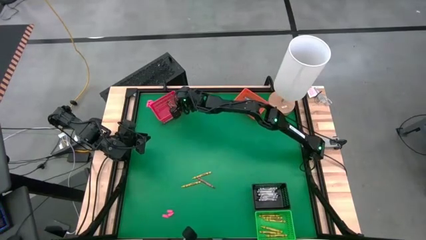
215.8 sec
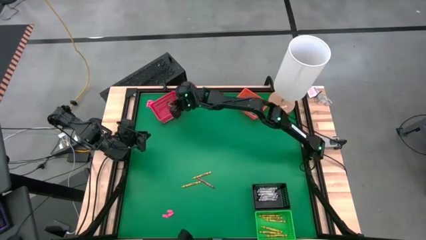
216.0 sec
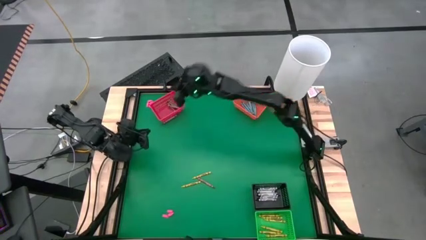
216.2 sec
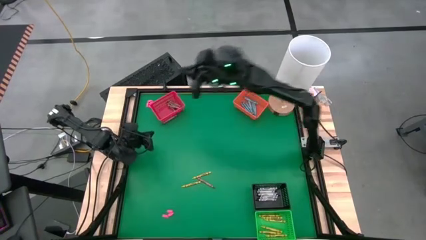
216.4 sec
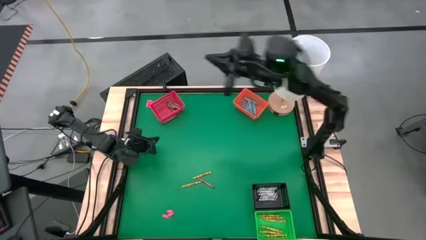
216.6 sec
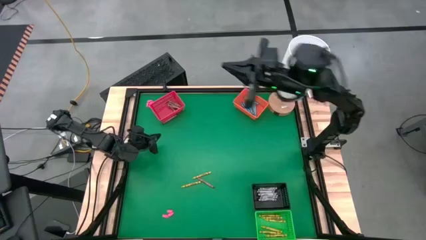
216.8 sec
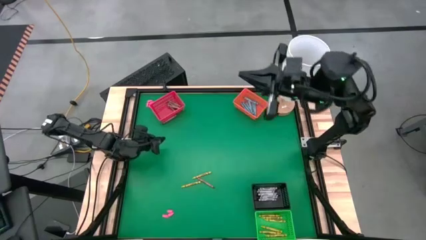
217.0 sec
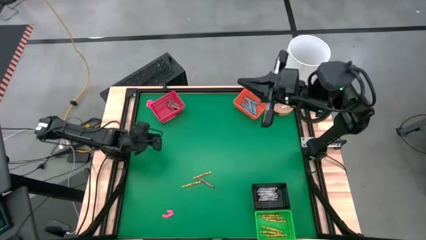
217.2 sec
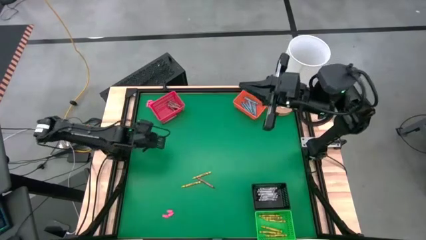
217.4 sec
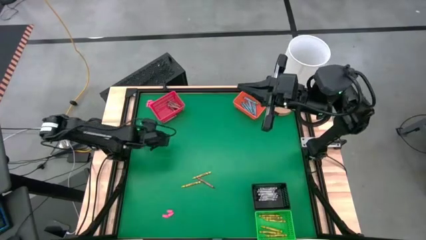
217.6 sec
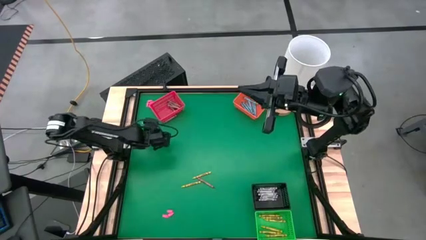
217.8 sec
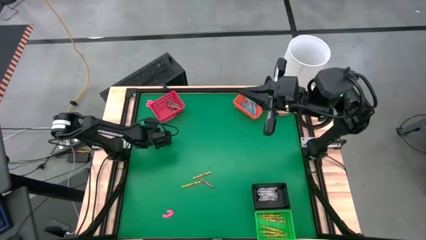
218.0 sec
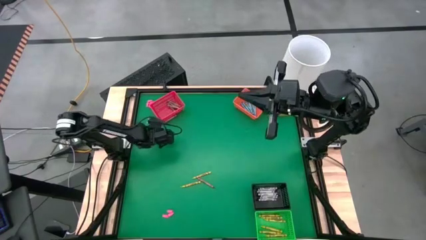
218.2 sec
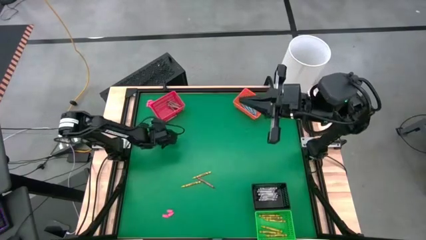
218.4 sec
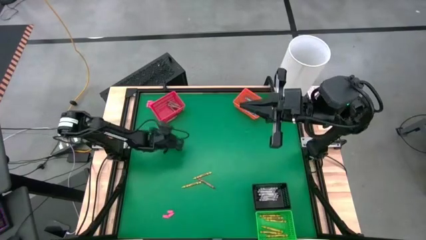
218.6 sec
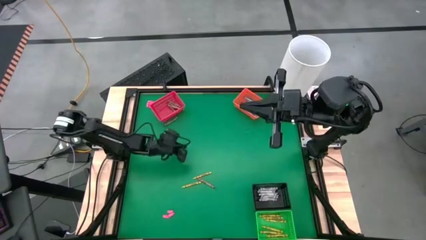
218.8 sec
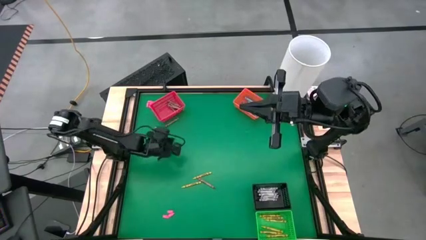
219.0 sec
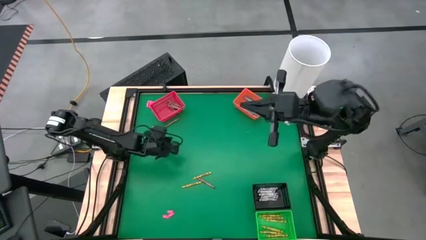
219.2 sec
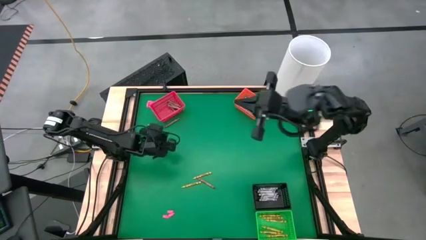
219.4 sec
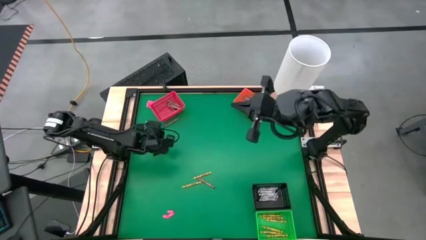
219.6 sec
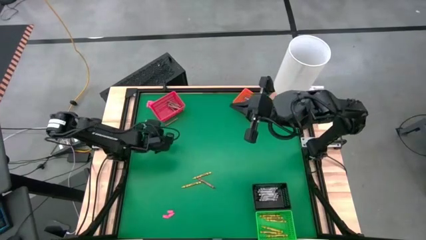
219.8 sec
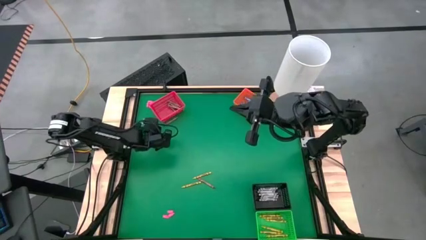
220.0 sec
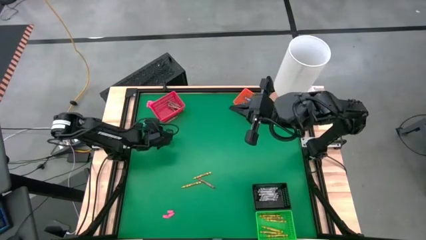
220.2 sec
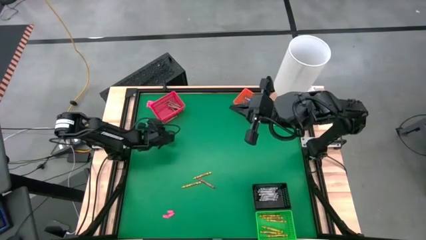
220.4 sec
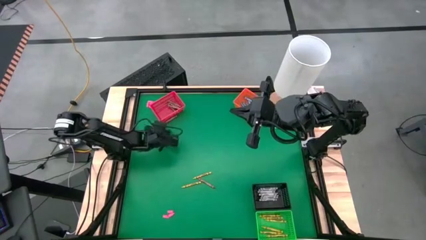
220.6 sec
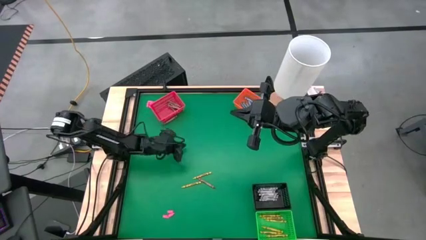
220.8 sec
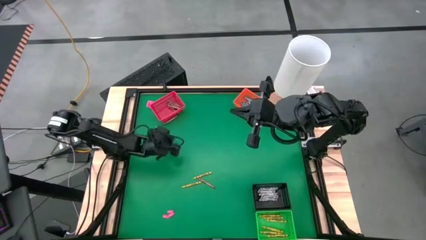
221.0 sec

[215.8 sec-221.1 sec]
Task: Sort crayons
Put the brown crayon into the red bin

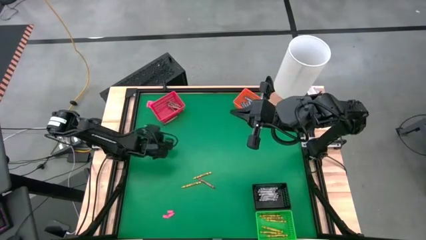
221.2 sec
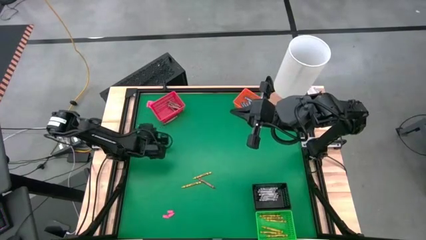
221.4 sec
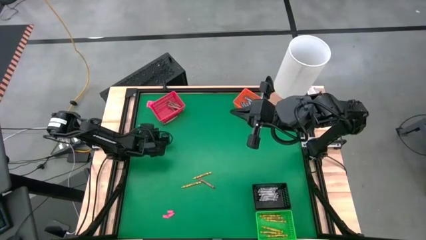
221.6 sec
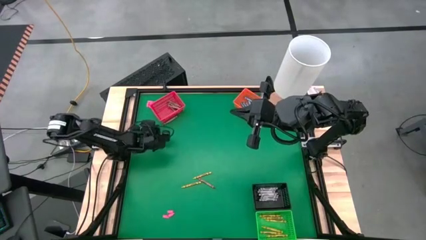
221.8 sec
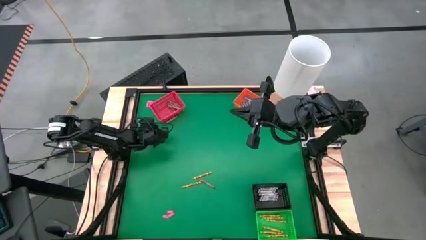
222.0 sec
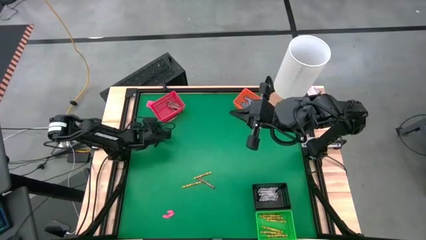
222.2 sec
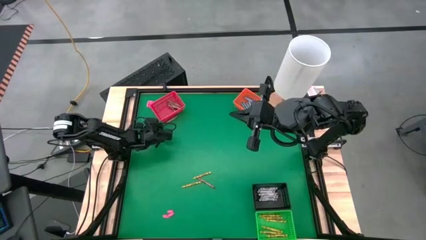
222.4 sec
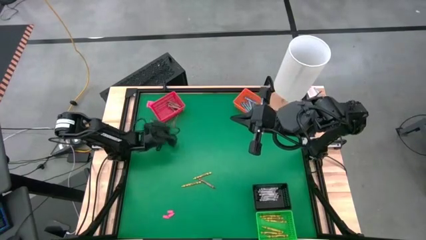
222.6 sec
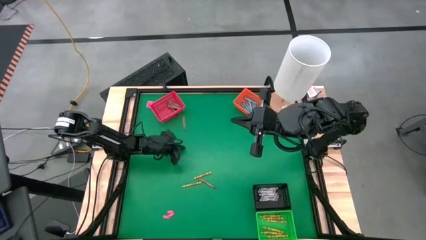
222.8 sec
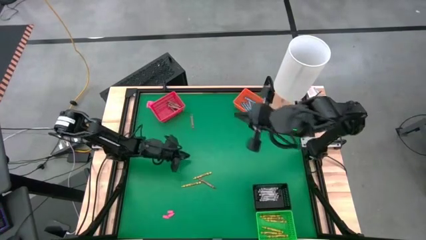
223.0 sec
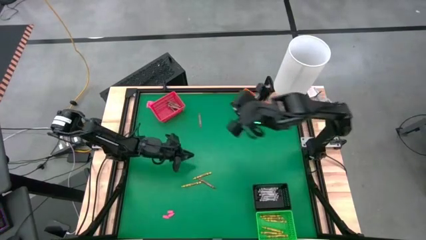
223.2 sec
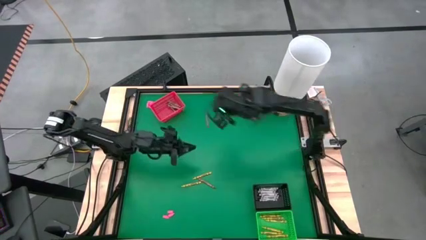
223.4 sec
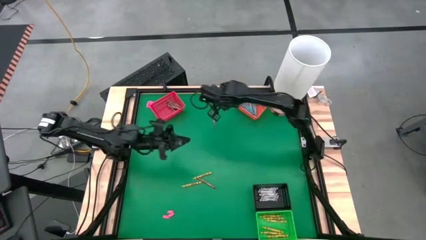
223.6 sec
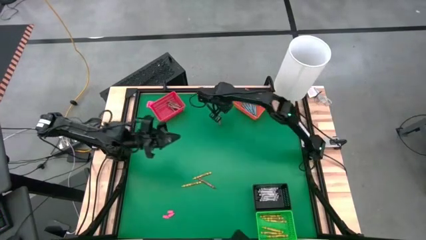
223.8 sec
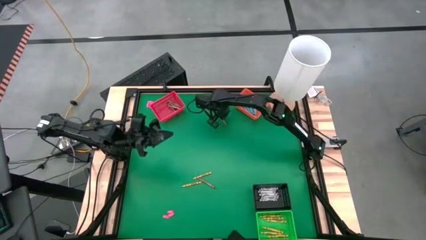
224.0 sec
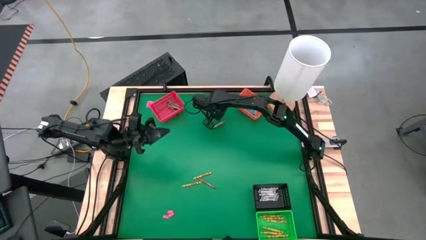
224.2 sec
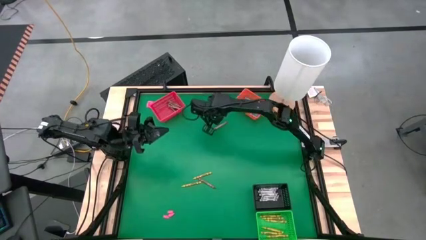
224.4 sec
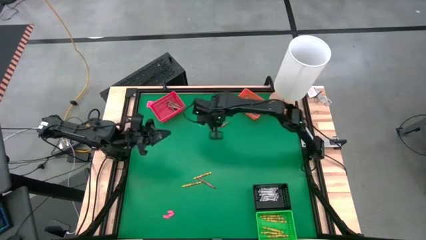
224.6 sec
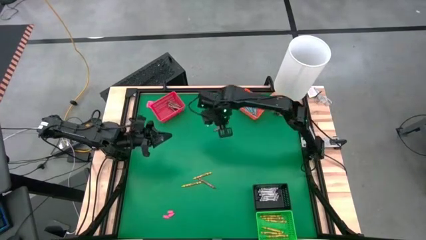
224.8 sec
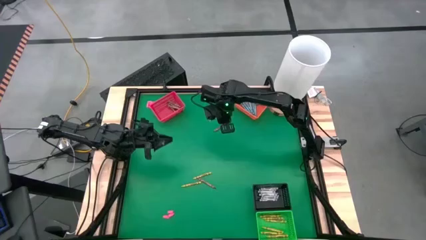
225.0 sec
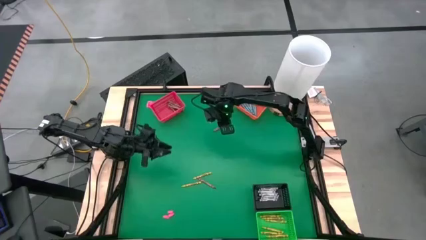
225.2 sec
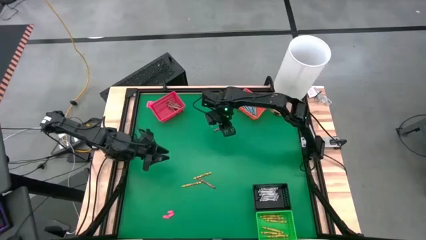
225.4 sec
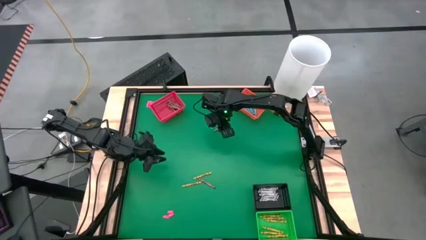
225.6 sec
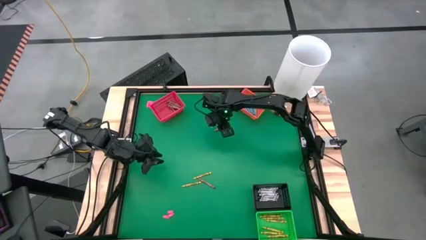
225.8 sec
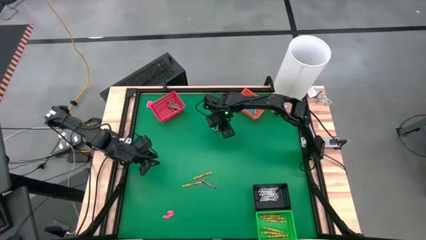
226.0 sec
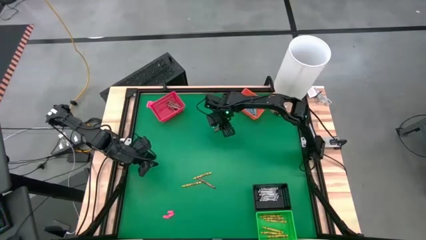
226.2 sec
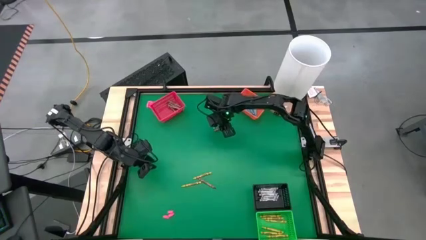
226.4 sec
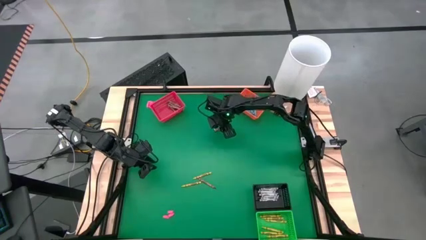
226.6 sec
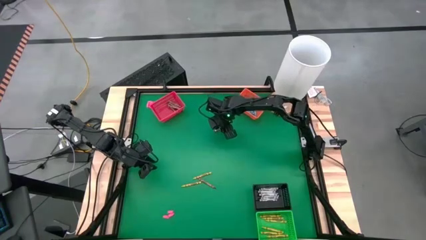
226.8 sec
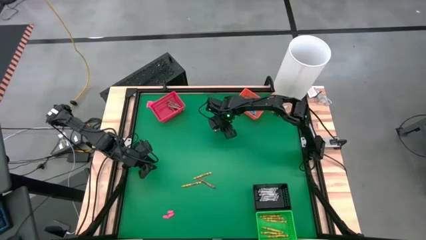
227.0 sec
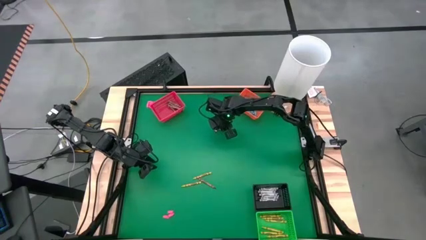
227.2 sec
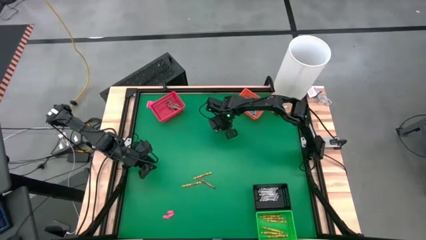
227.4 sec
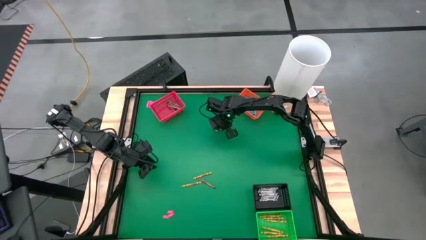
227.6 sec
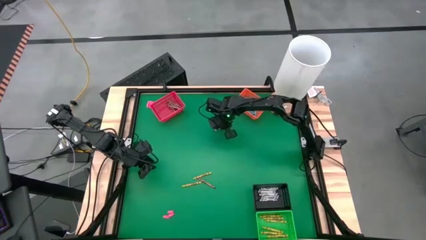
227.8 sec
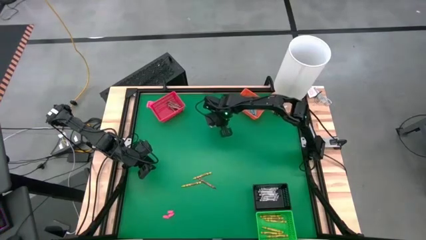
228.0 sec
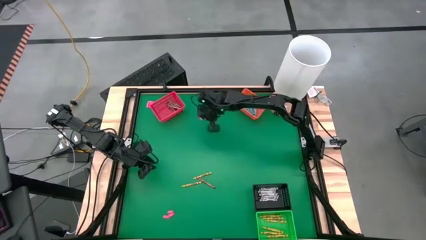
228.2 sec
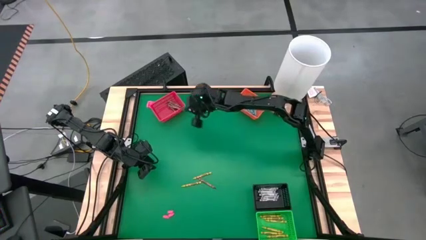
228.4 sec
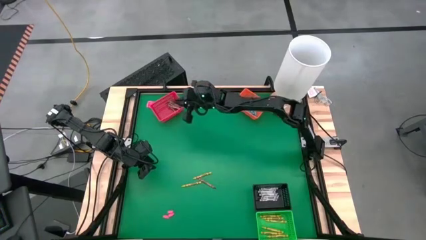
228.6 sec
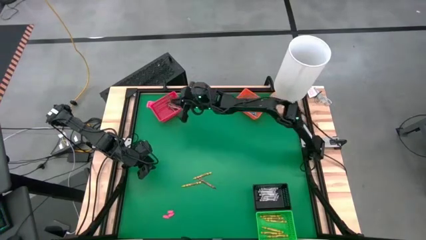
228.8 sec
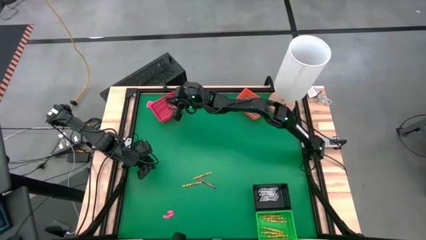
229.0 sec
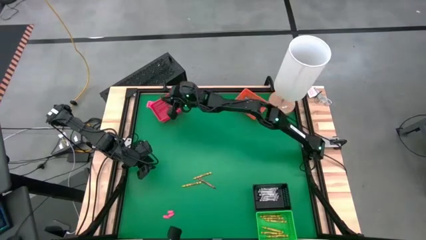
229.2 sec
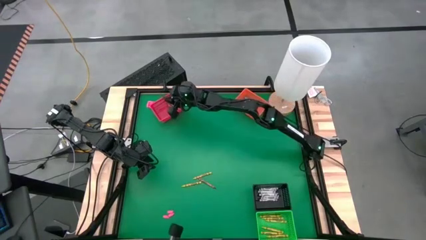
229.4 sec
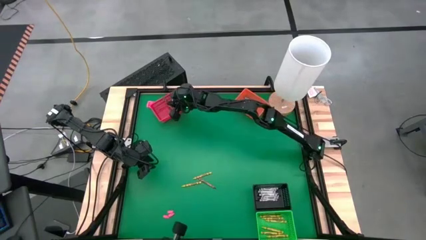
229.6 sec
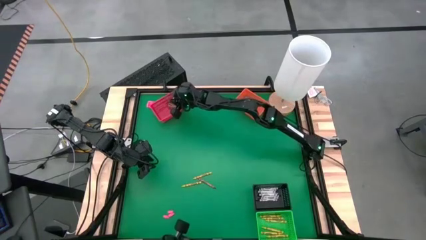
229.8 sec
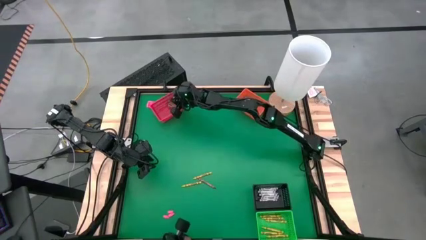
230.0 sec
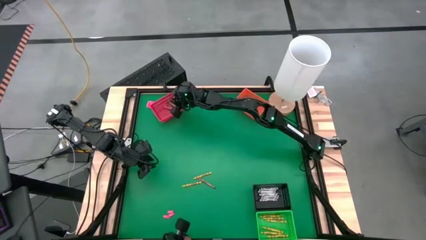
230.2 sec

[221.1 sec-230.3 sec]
Put the brown crayon into the red bin
